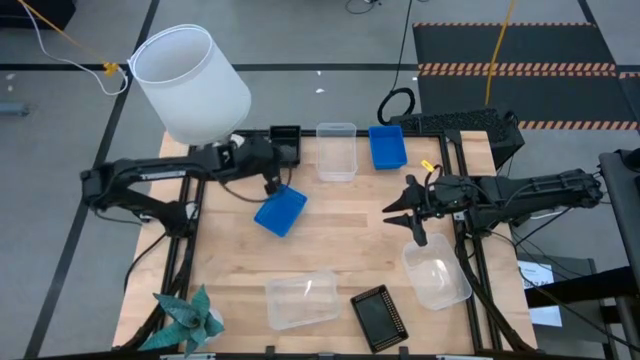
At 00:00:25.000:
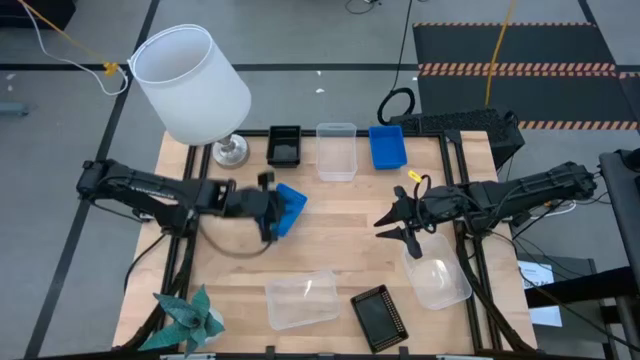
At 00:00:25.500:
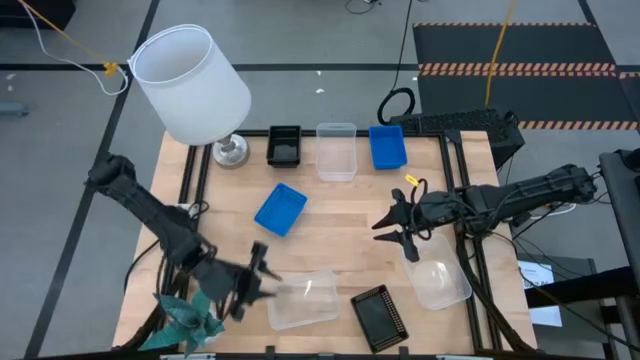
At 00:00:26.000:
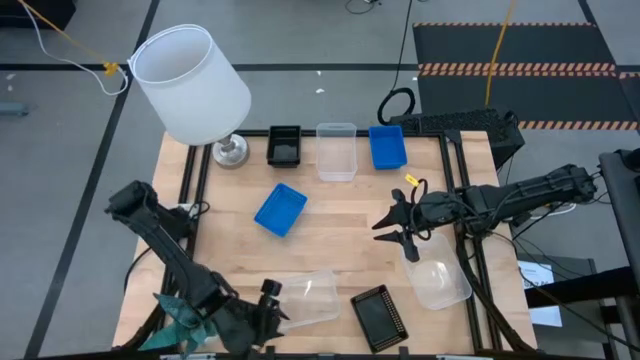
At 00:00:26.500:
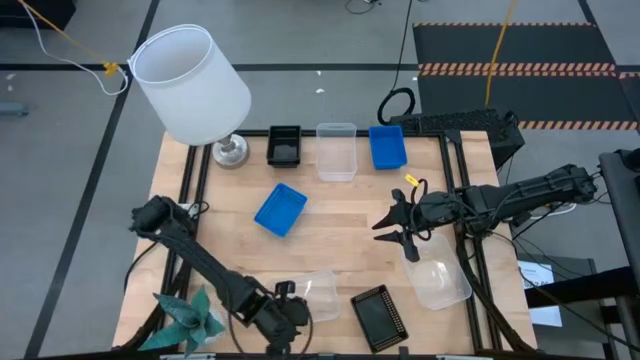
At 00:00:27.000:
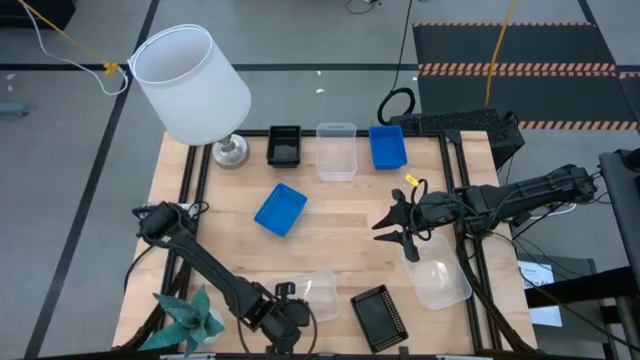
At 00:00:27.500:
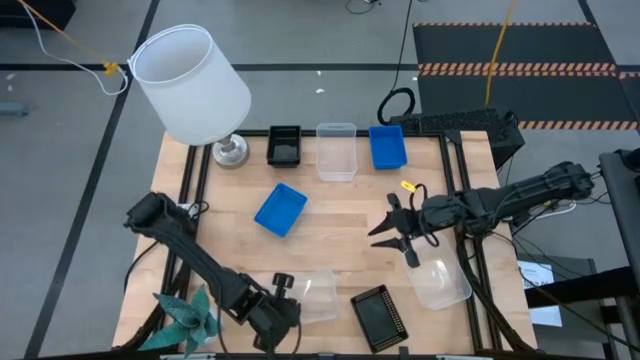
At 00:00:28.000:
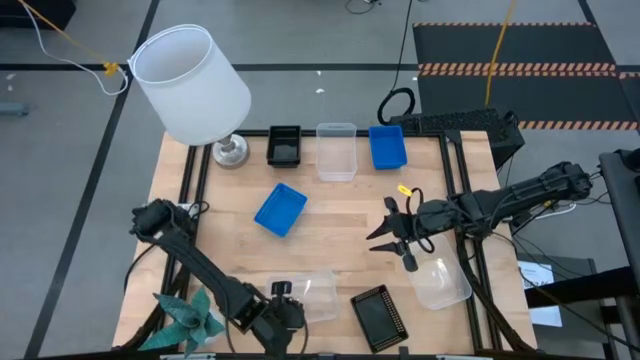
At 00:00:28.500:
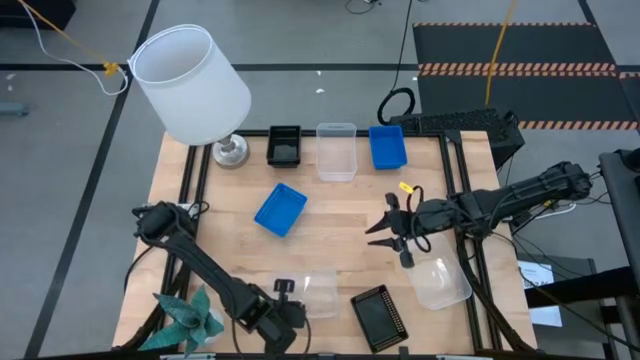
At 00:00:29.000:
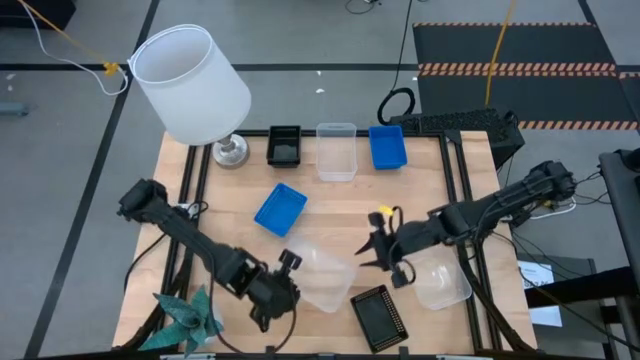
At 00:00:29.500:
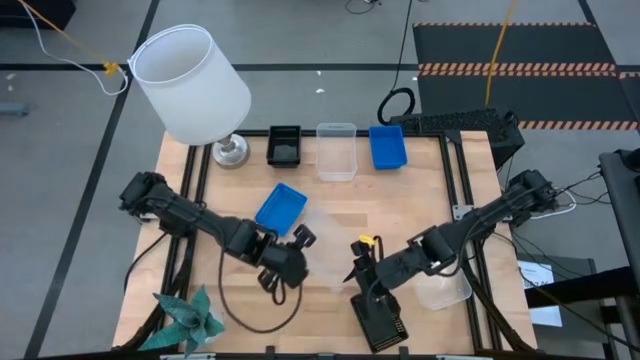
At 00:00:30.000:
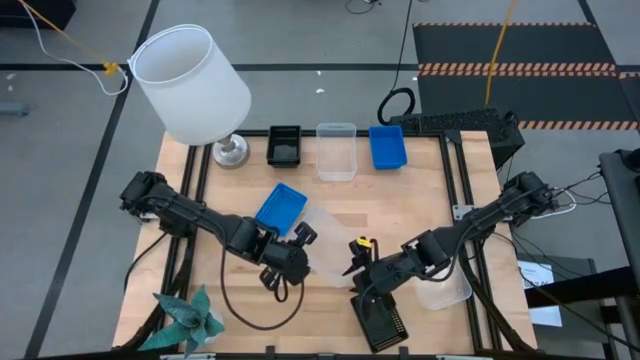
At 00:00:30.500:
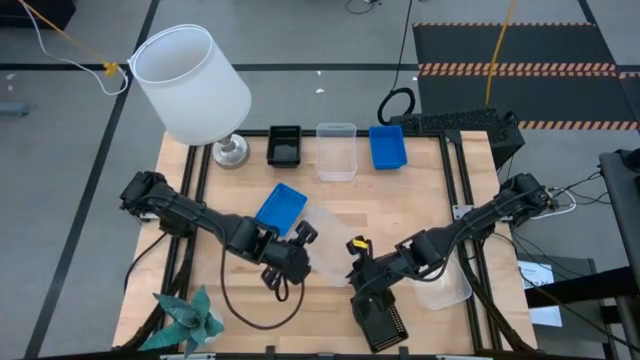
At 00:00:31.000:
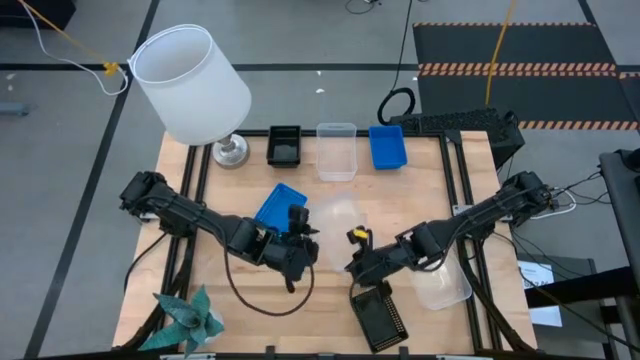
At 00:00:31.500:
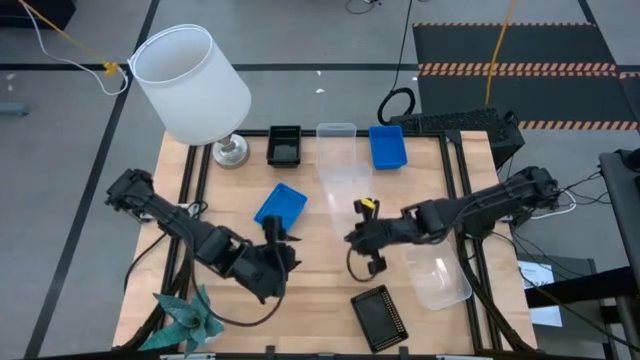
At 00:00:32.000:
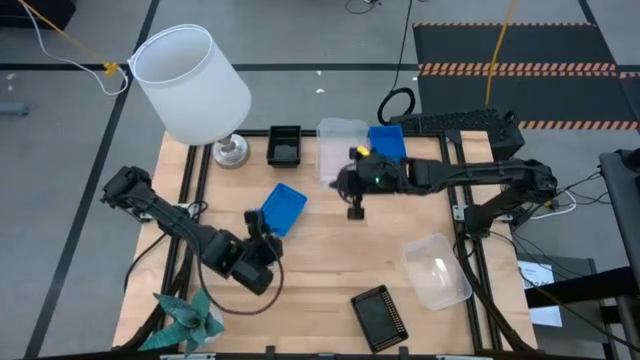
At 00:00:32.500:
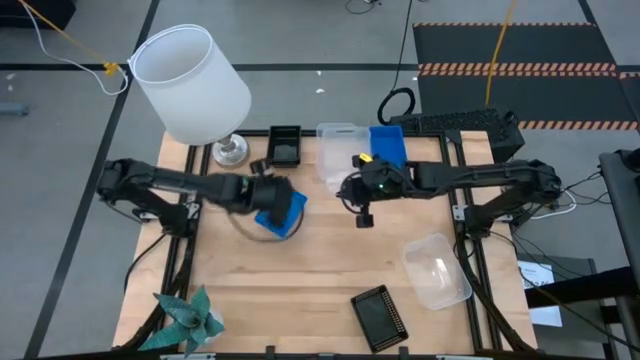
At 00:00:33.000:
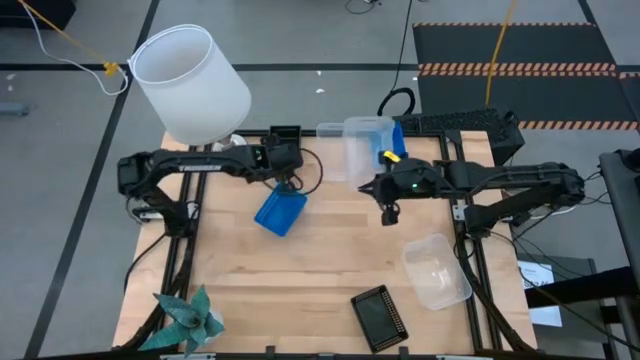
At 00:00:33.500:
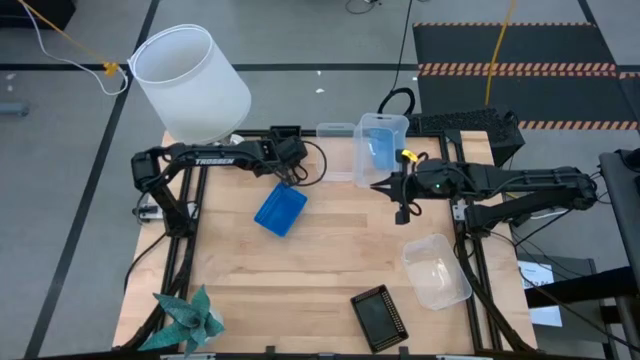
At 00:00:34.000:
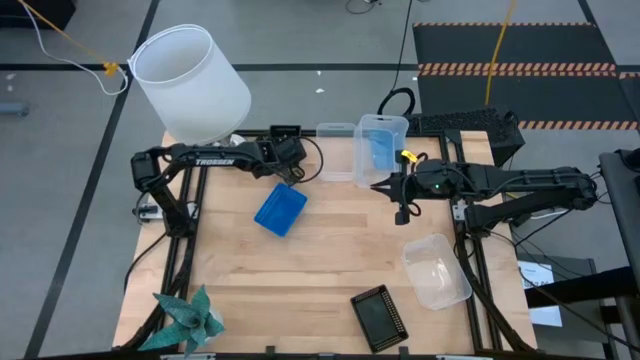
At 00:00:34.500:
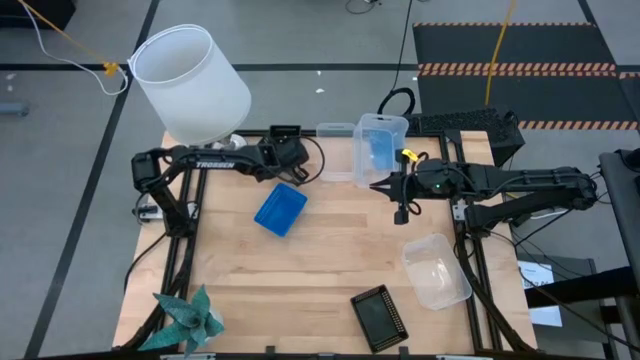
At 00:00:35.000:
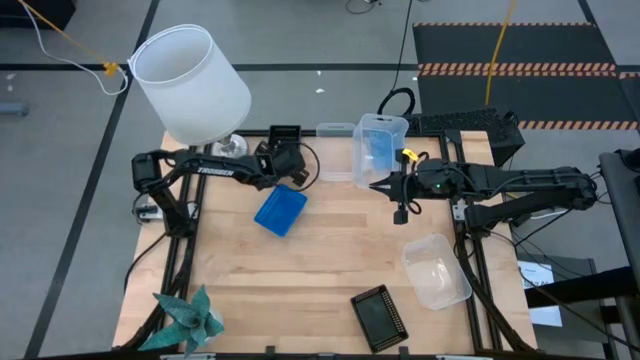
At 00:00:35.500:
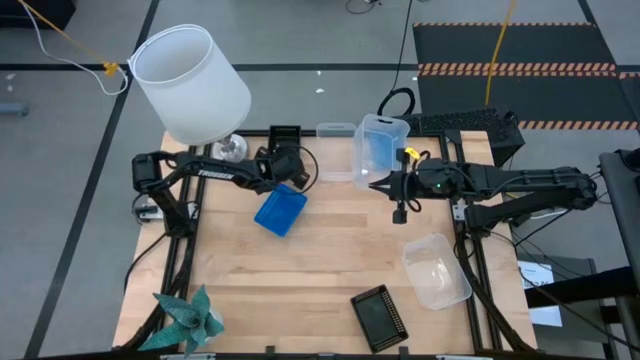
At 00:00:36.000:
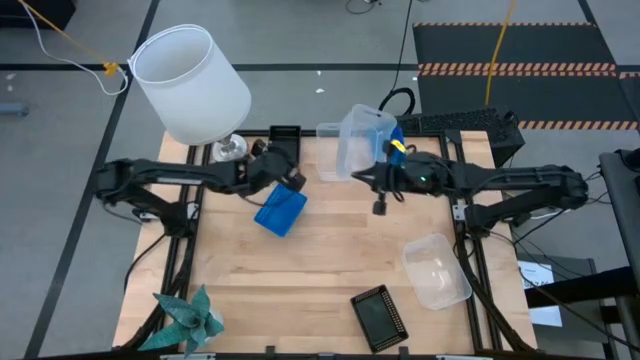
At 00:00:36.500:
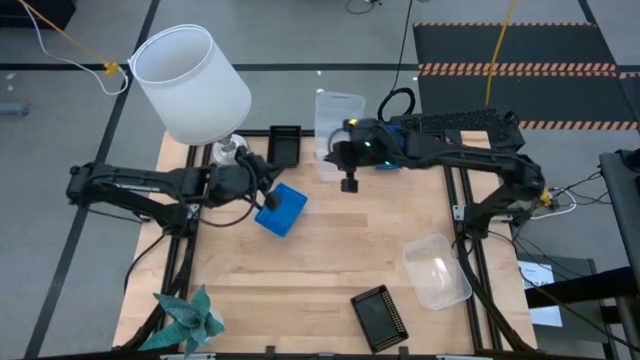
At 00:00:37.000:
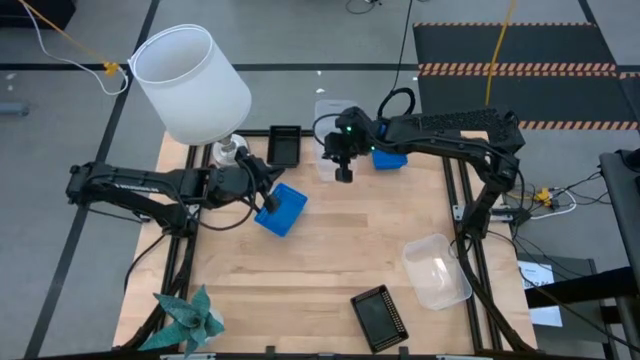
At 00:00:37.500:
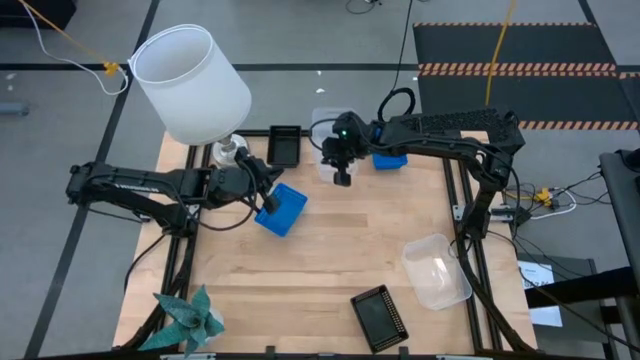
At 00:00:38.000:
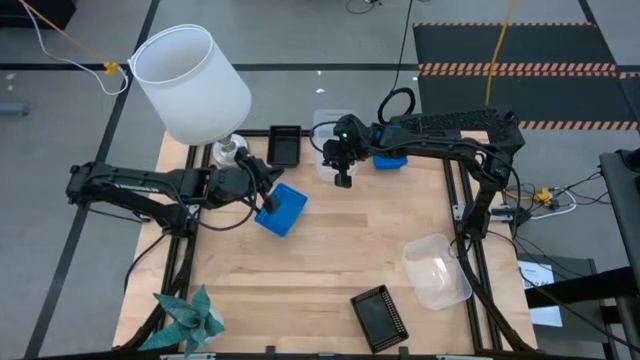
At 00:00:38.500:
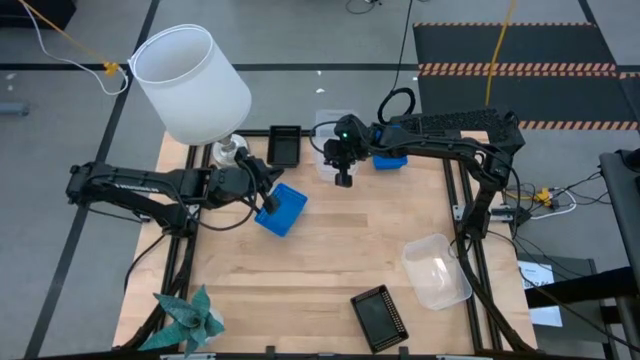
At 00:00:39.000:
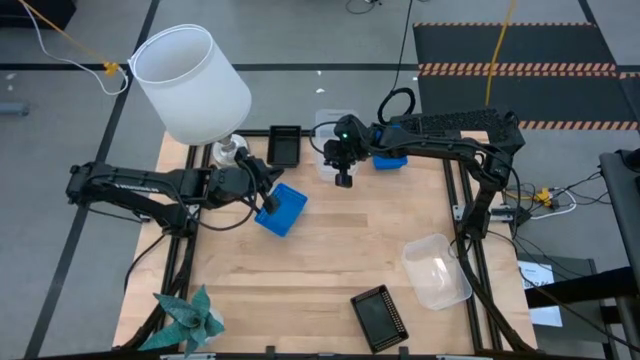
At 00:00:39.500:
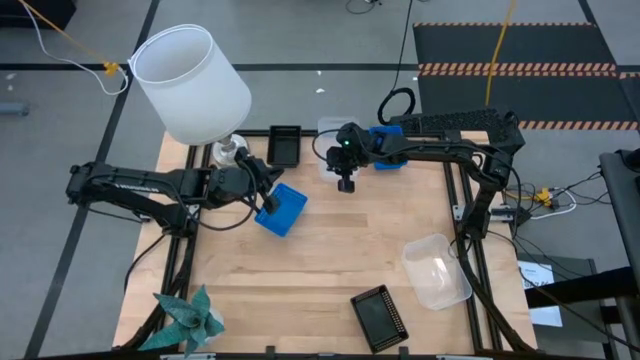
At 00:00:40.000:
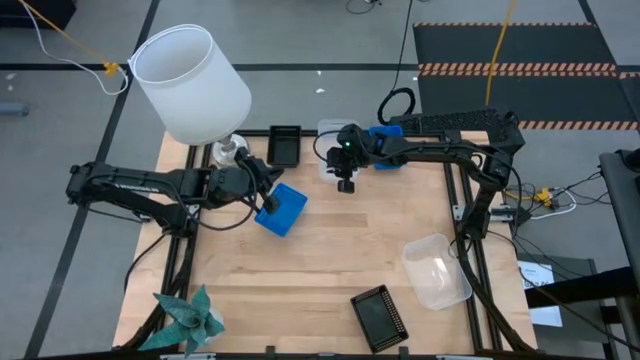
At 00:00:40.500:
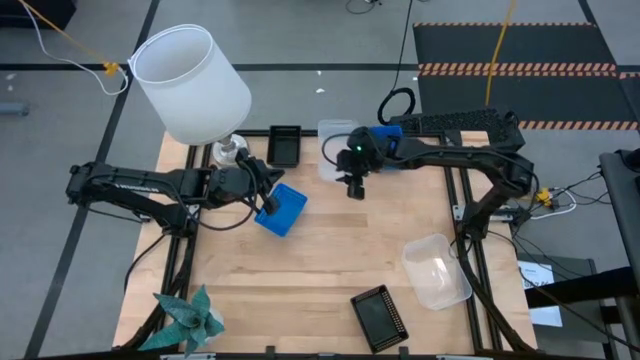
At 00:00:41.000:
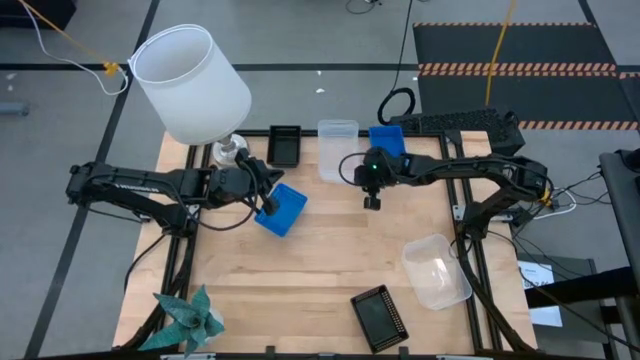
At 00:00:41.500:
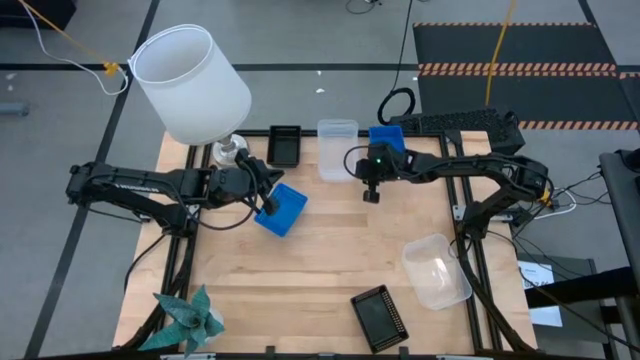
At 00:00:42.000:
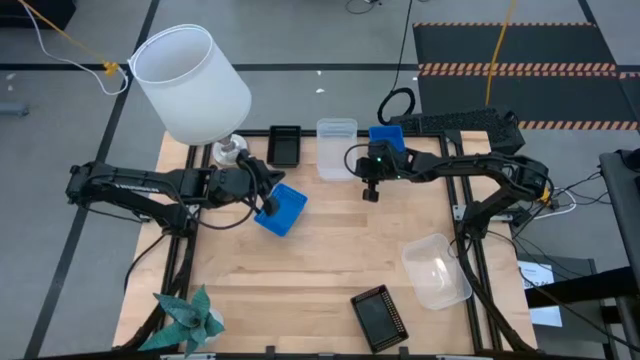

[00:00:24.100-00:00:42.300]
Put the bottom left transparent bin on the top left transparent bin
